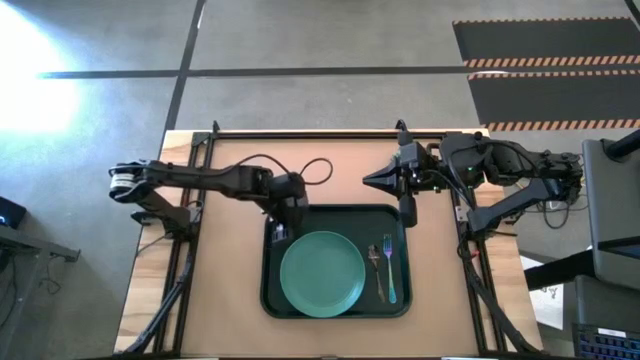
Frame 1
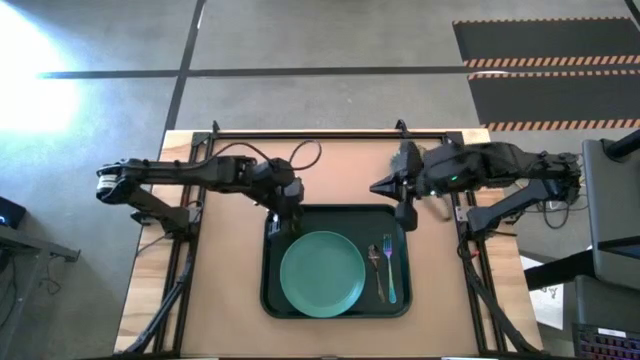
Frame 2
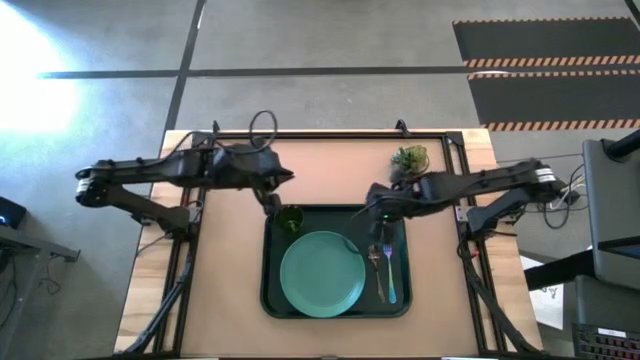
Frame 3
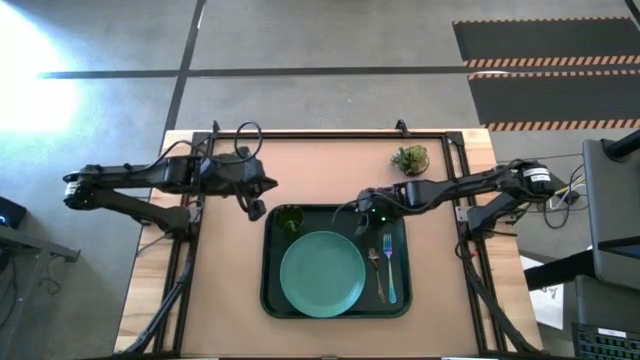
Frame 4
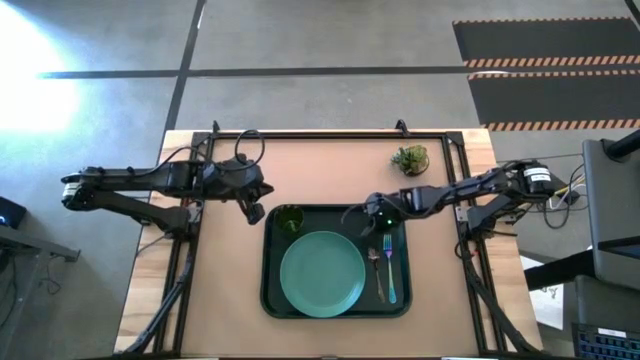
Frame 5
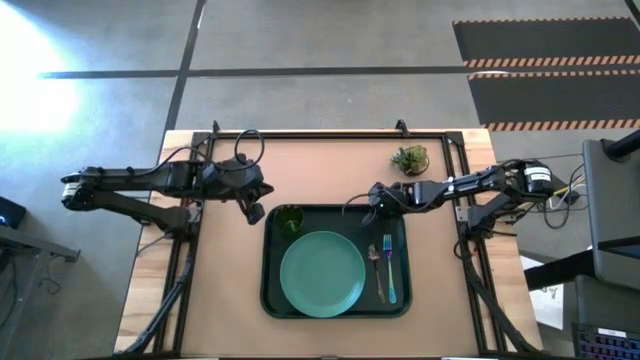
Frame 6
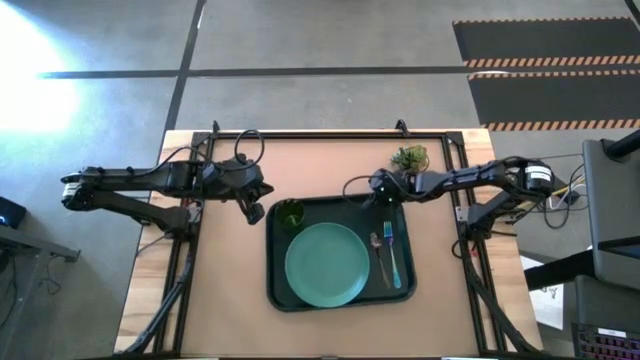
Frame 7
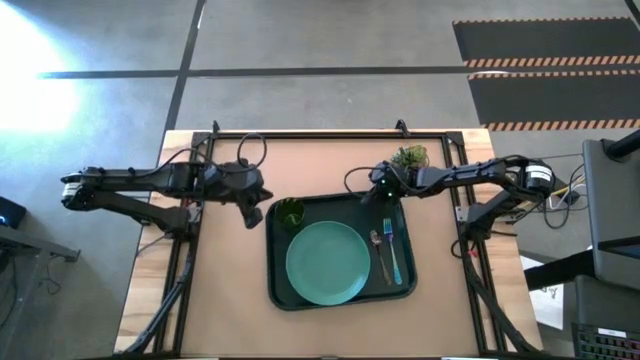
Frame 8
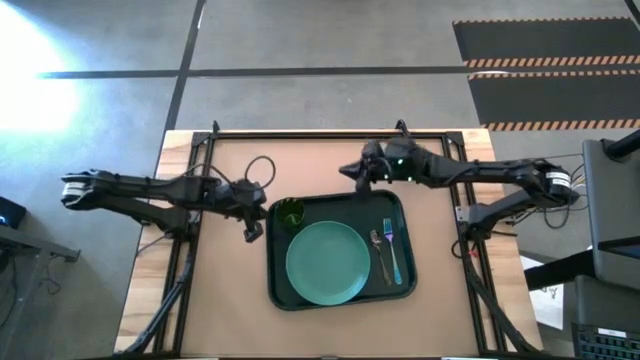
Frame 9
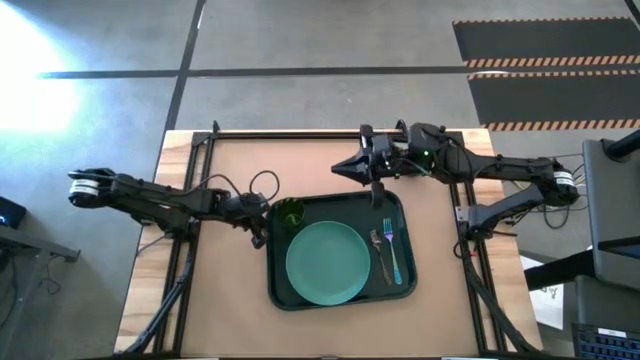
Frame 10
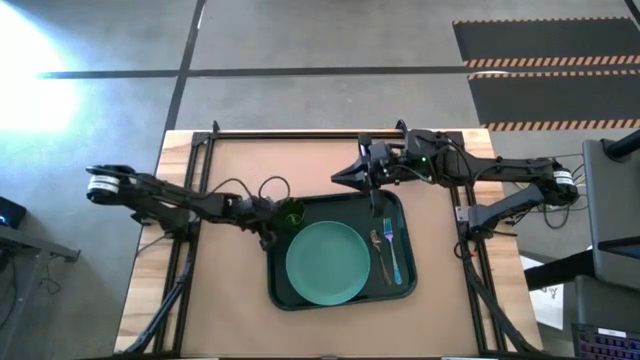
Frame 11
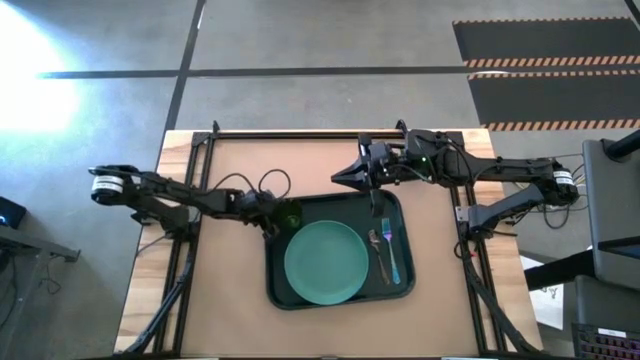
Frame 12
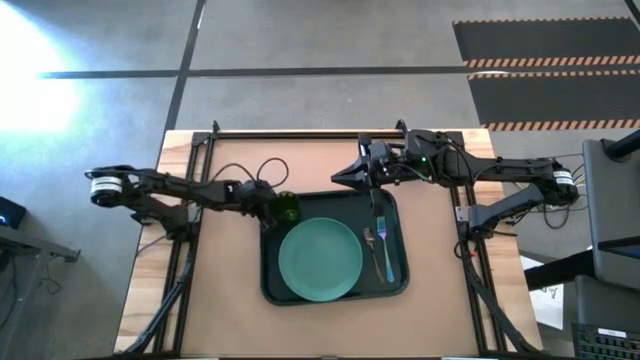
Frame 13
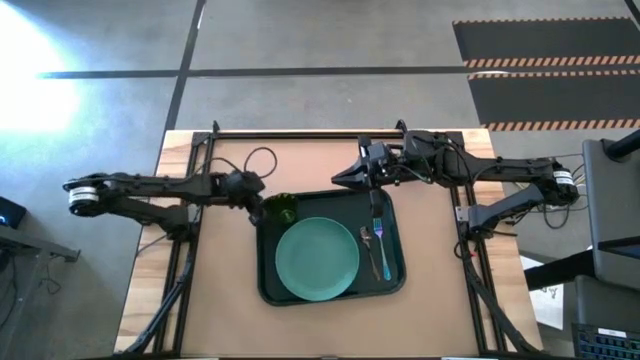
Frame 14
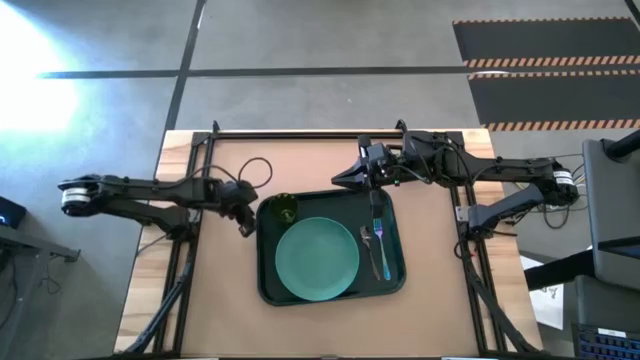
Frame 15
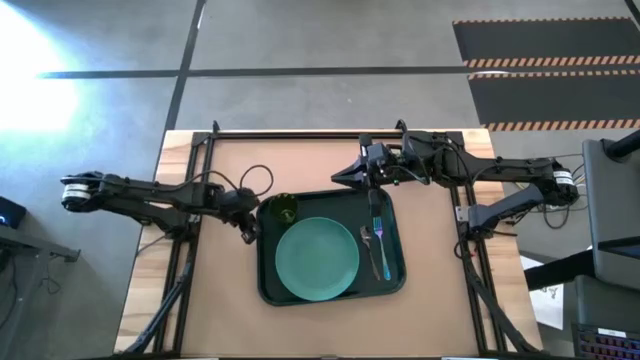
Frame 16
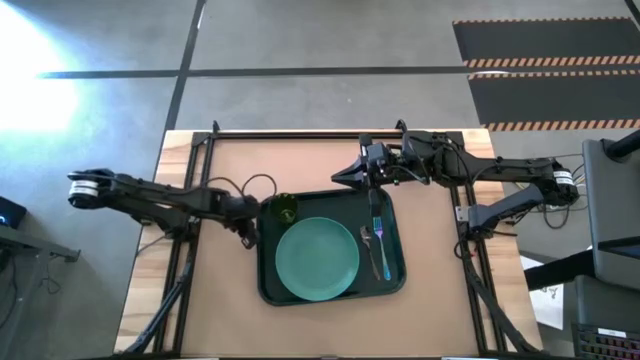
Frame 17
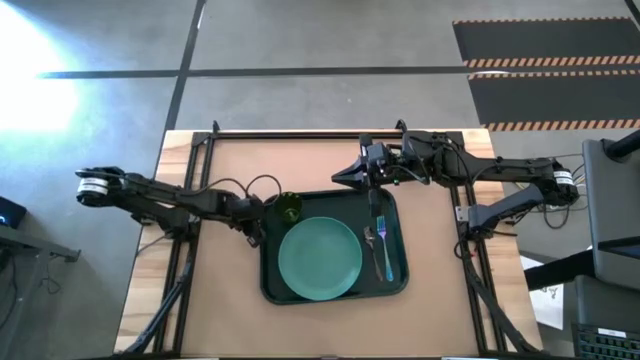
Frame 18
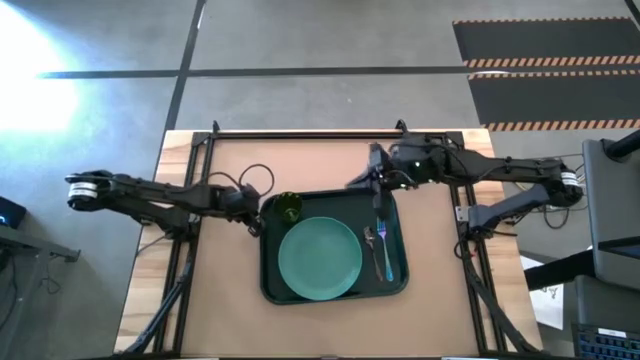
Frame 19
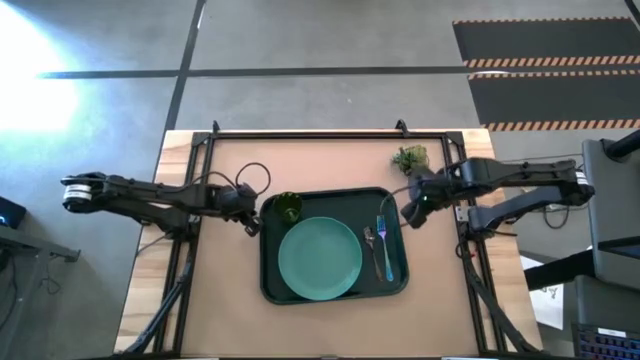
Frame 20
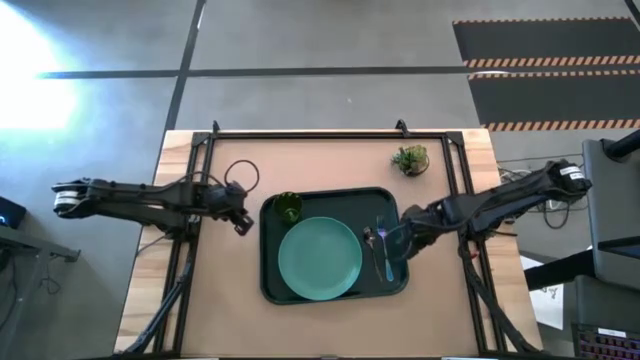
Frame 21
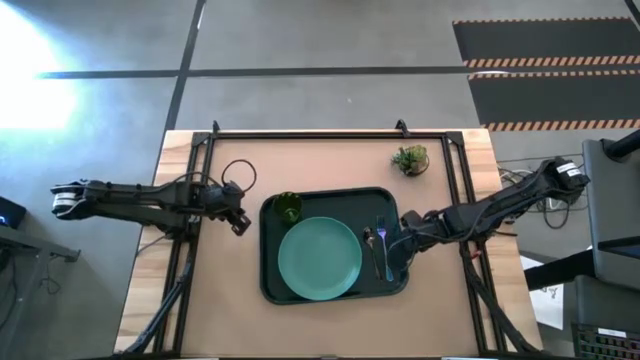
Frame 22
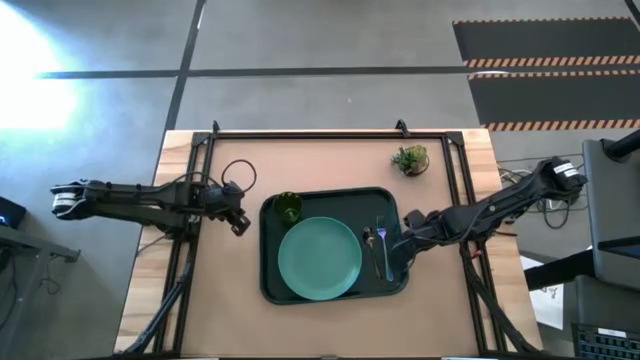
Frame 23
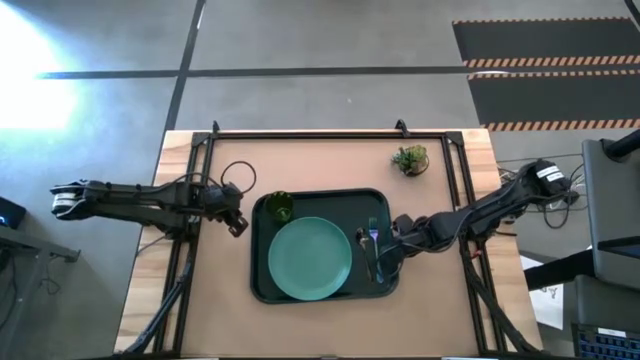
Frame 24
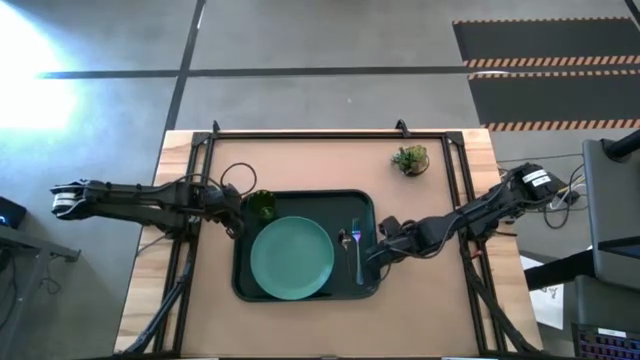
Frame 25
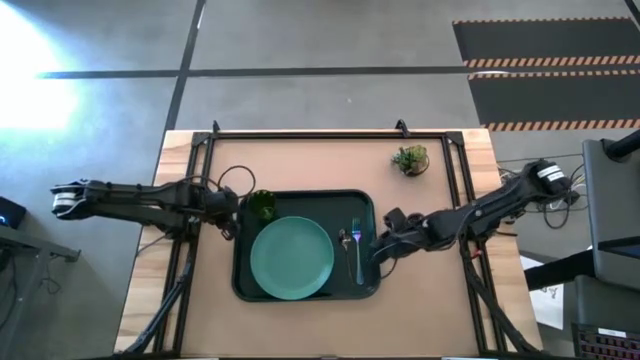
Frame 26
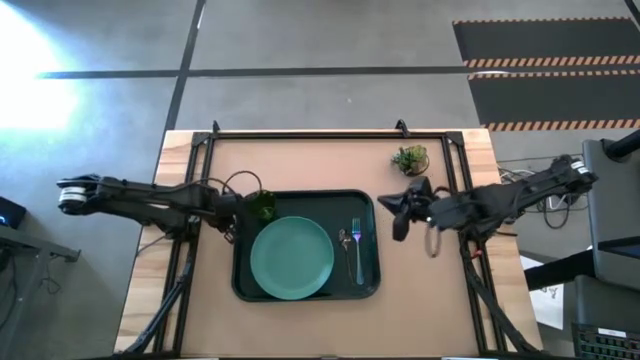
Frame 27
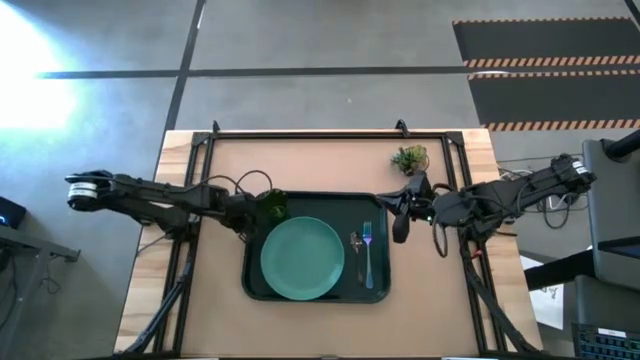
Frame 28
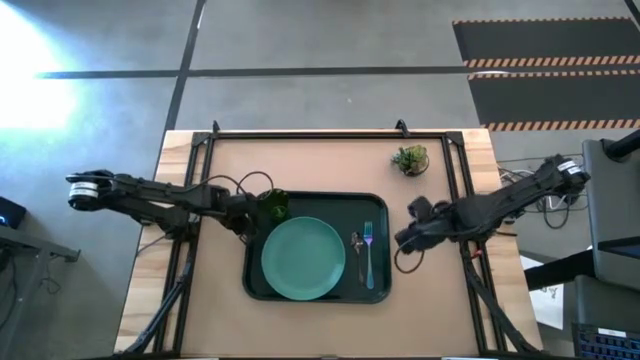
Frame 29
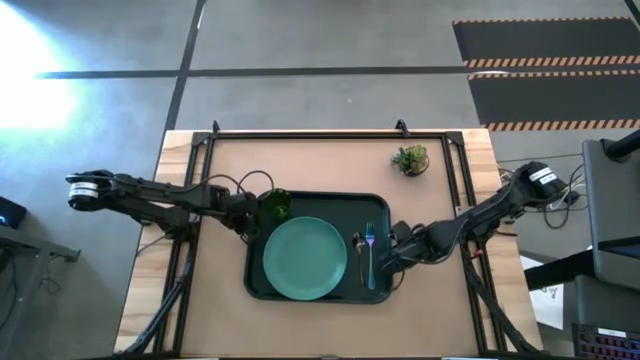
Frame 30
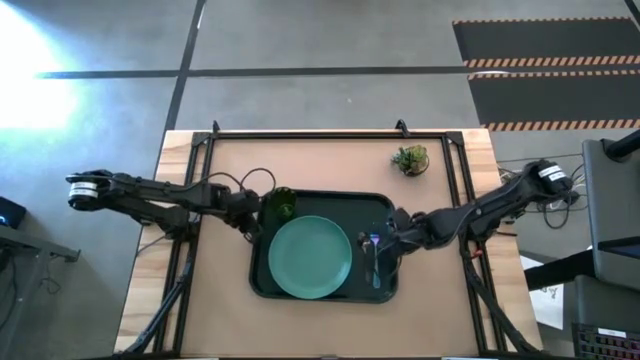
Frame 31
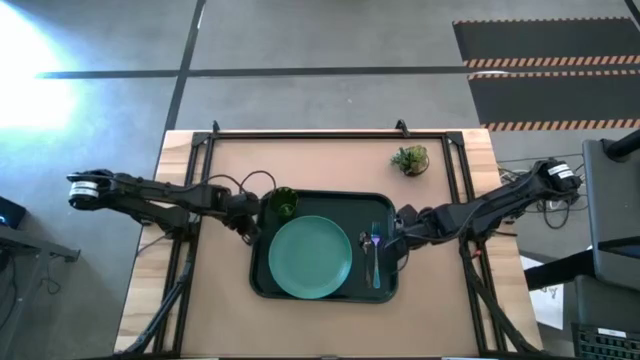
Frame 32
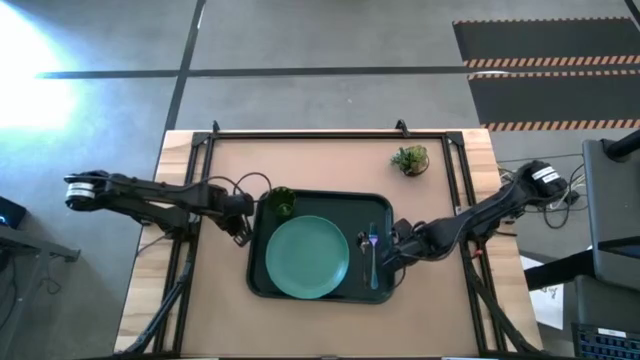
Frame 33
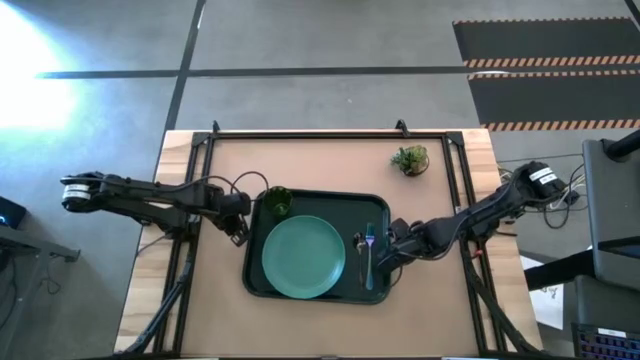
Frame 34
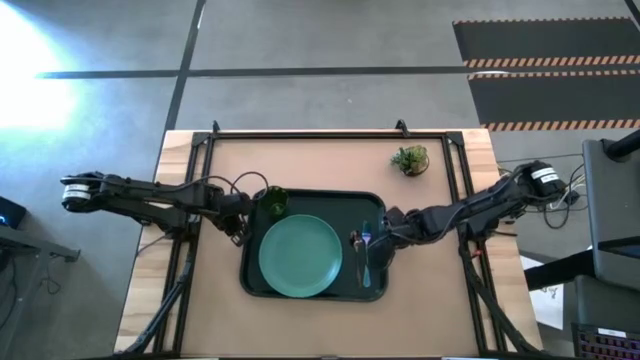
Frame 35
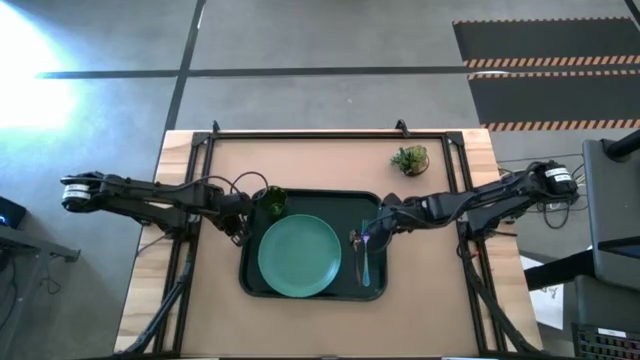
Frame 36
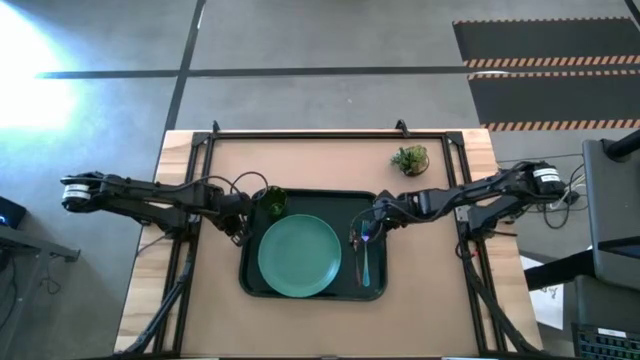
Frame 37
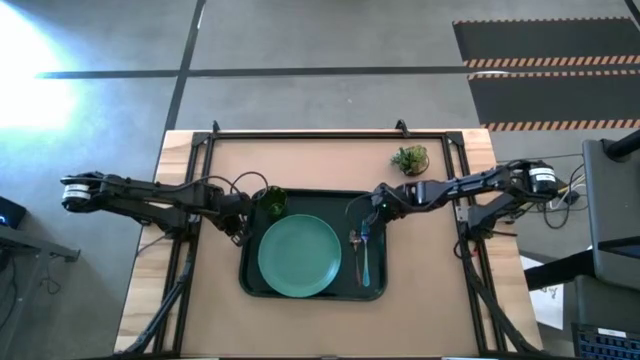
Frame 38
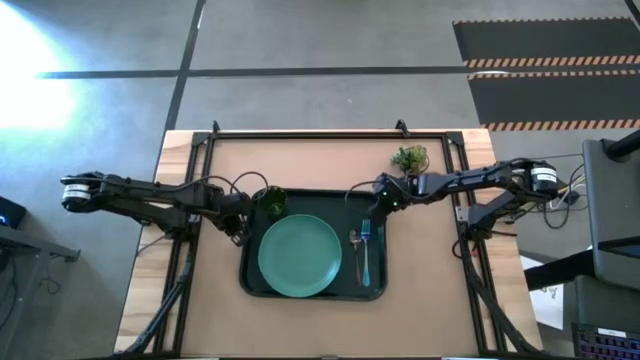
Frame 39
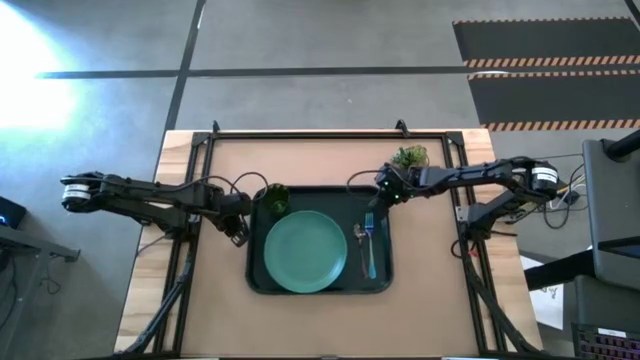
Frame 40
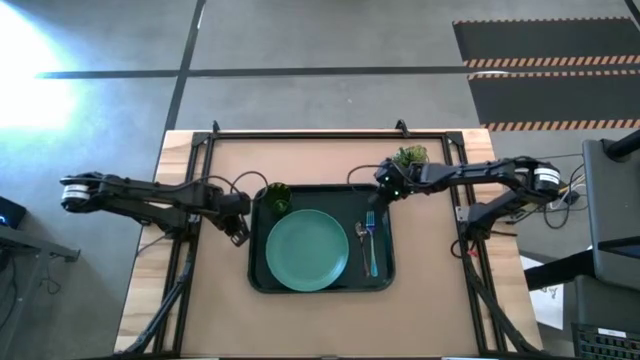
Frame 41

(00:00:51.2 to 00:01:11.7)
Task: Pick and place plate/cup/fork/spoon on tray
Move the black tray to the center of the table

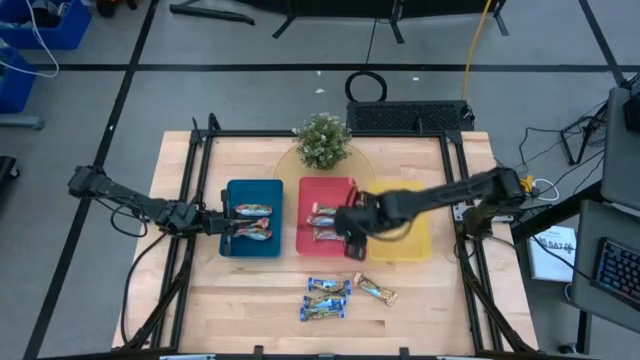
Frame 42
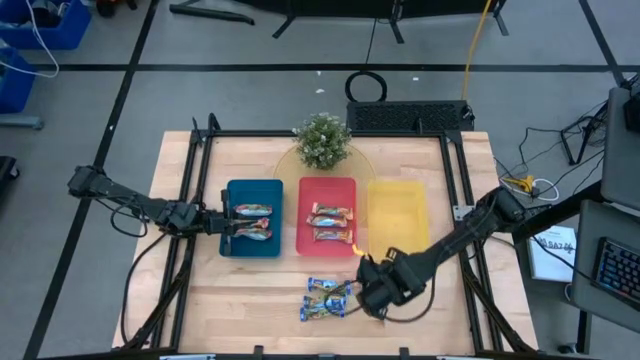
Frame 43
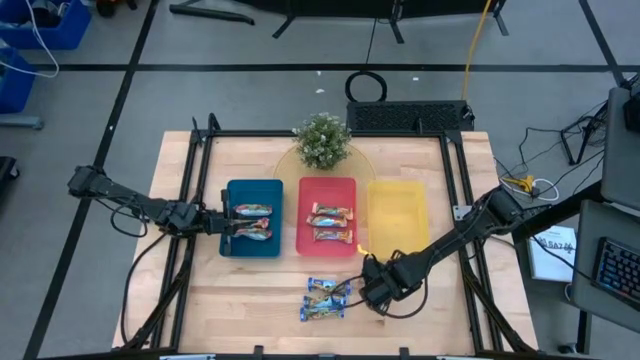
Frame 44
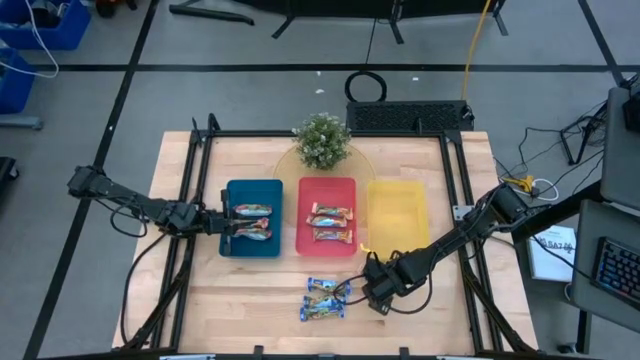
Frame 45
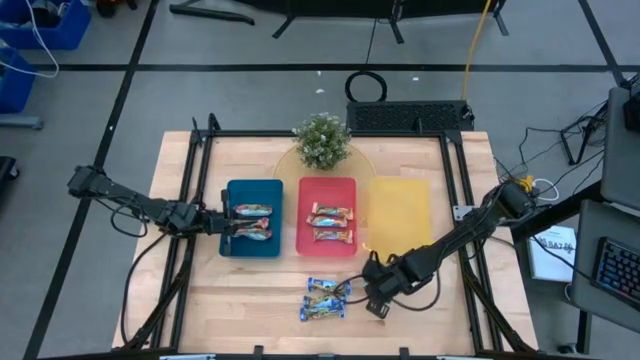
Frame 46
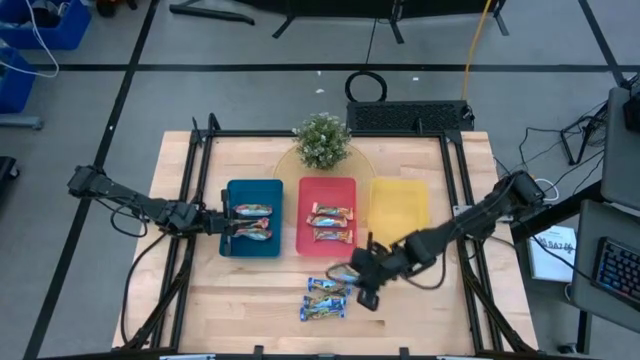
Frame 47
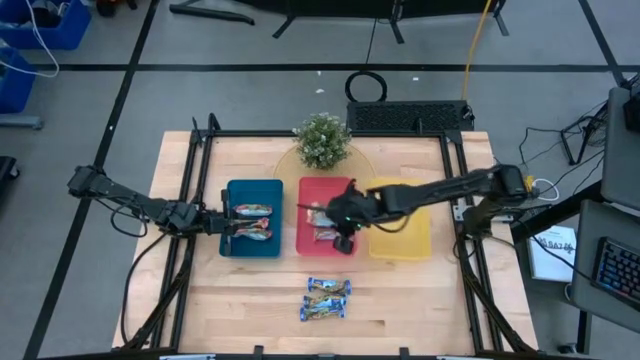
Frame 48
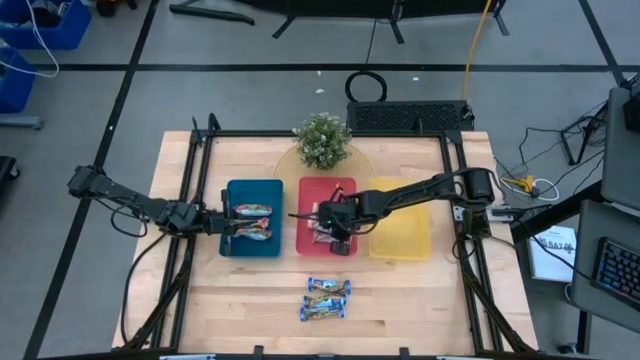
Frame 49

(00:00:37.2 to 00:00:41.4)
Task: Pick and place Granola Bars by type
Put the yellow granola bar into the red bin
